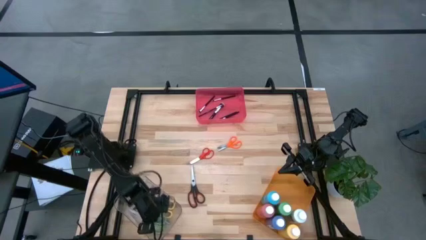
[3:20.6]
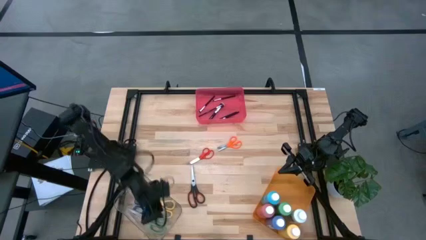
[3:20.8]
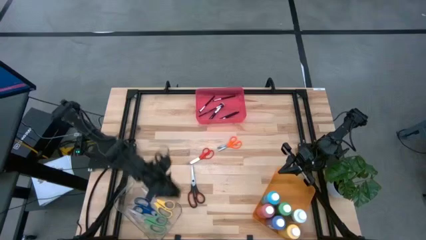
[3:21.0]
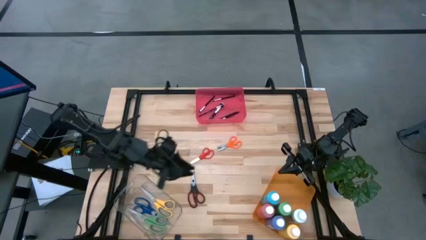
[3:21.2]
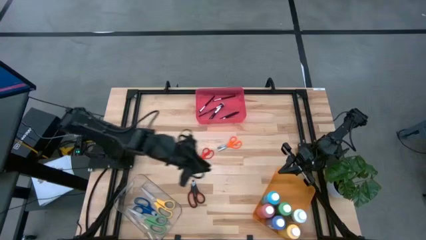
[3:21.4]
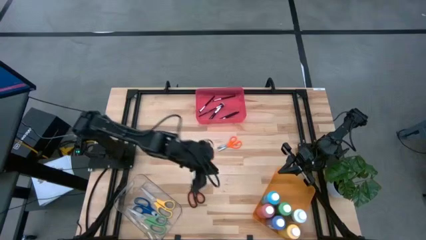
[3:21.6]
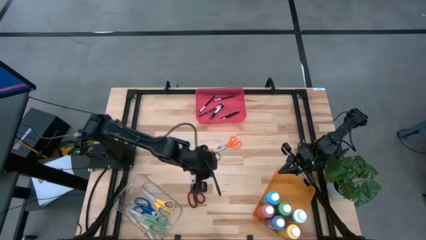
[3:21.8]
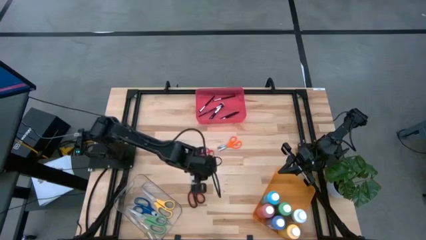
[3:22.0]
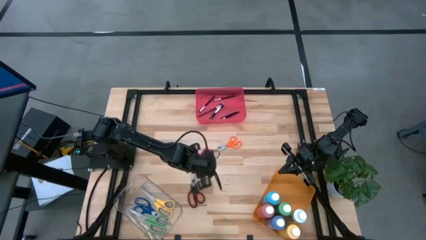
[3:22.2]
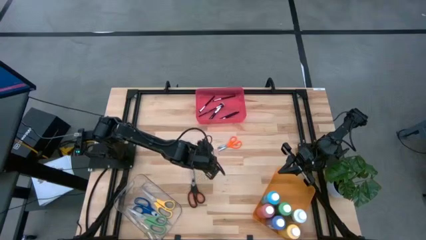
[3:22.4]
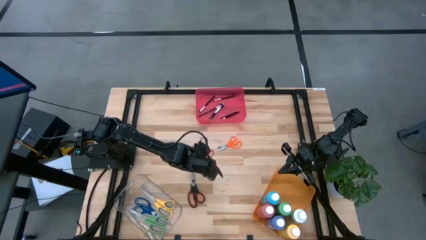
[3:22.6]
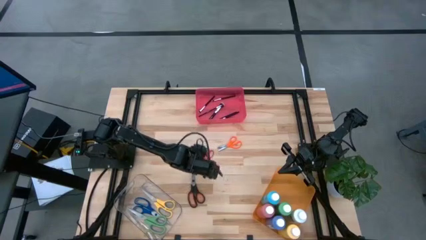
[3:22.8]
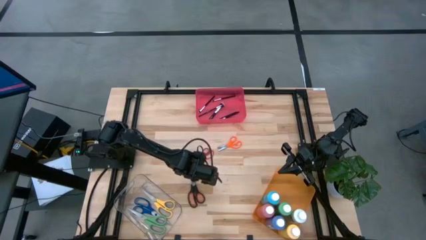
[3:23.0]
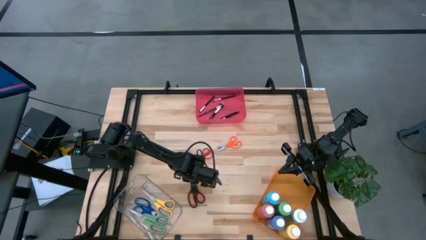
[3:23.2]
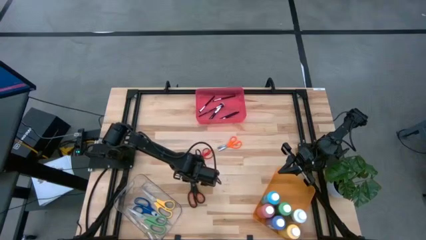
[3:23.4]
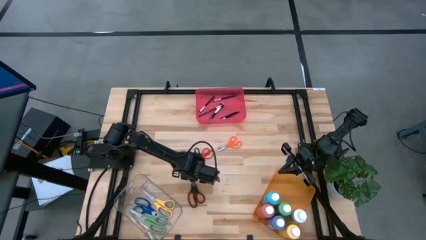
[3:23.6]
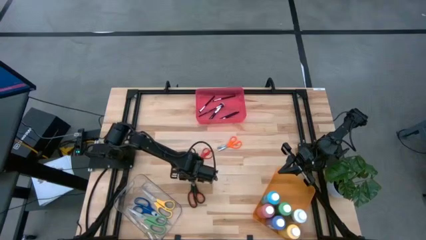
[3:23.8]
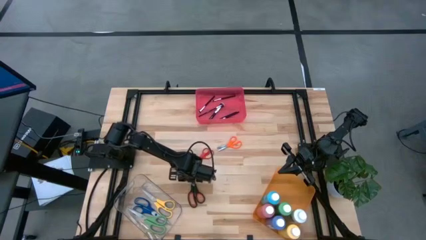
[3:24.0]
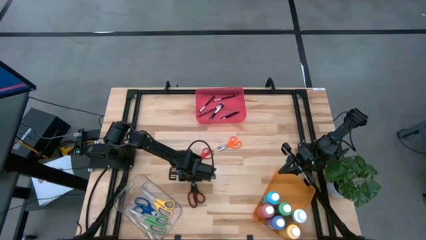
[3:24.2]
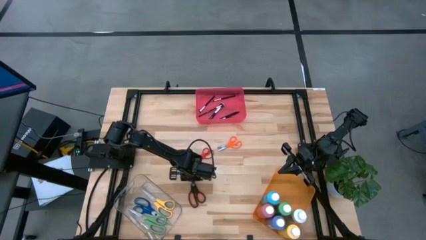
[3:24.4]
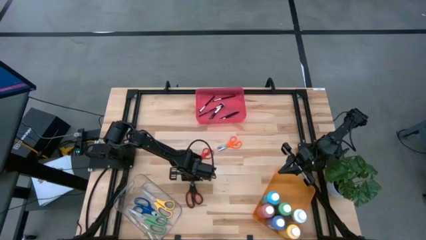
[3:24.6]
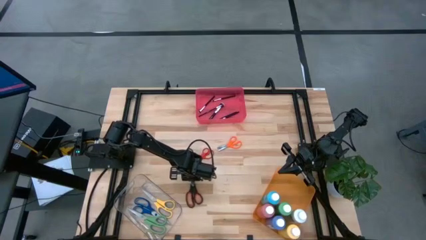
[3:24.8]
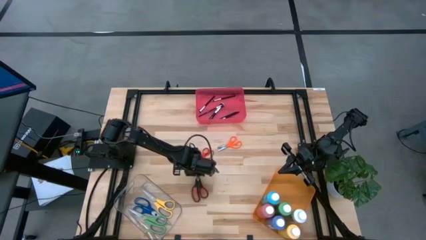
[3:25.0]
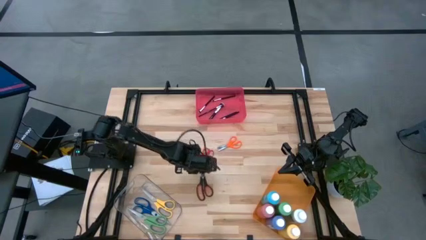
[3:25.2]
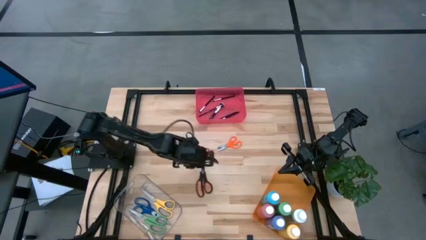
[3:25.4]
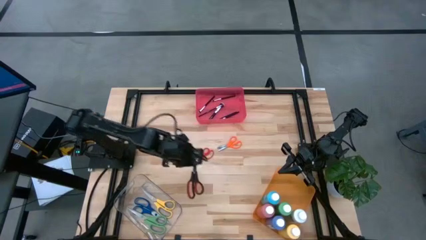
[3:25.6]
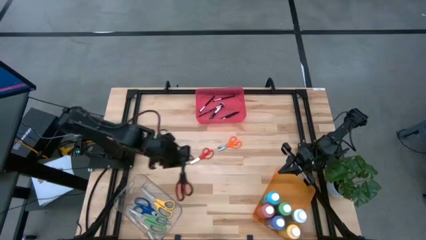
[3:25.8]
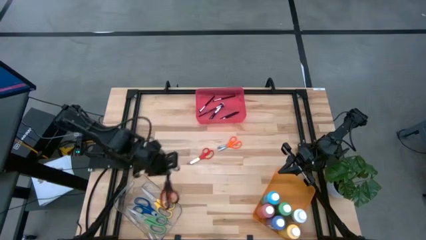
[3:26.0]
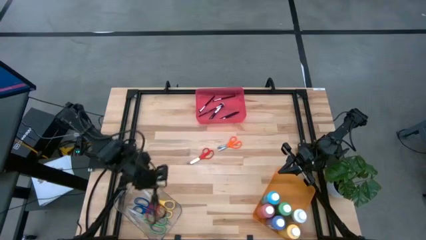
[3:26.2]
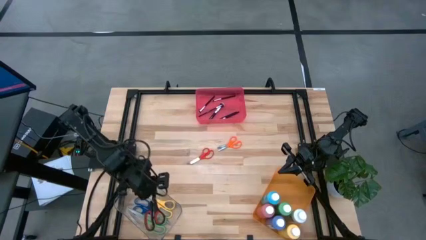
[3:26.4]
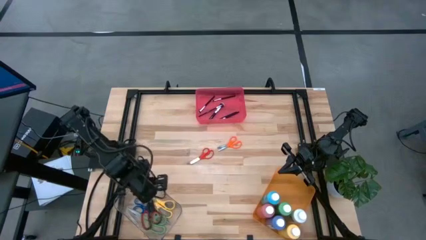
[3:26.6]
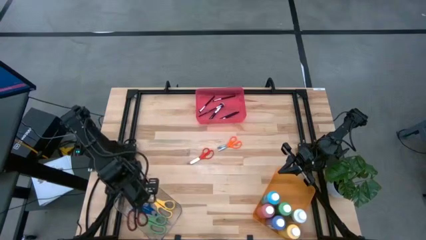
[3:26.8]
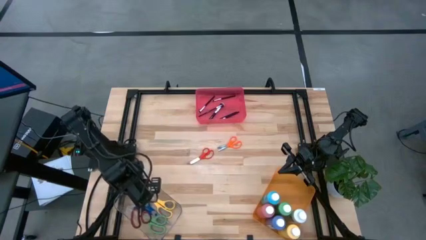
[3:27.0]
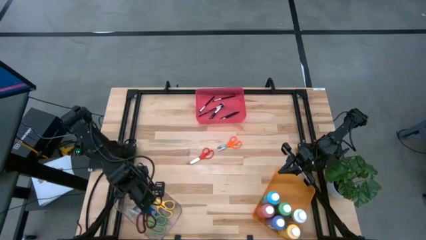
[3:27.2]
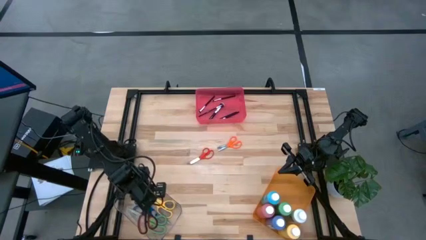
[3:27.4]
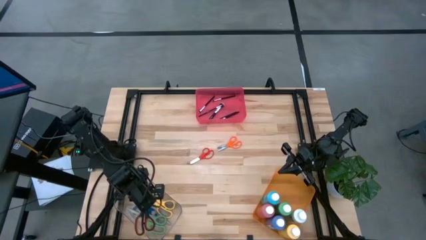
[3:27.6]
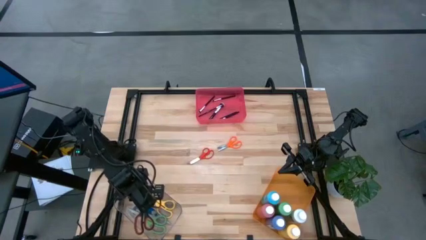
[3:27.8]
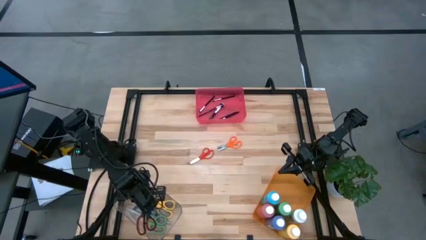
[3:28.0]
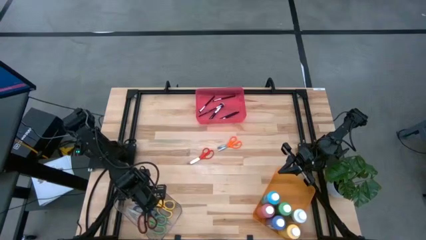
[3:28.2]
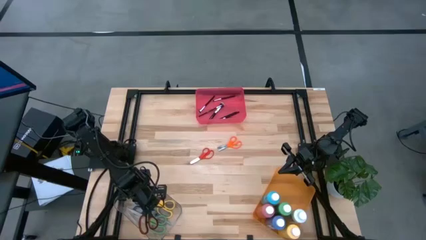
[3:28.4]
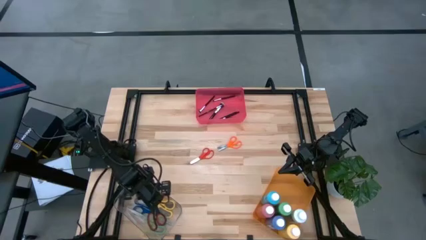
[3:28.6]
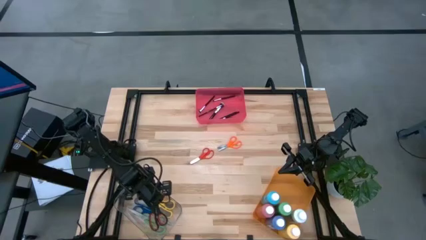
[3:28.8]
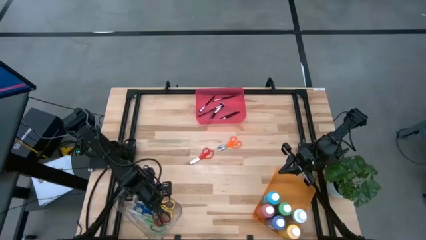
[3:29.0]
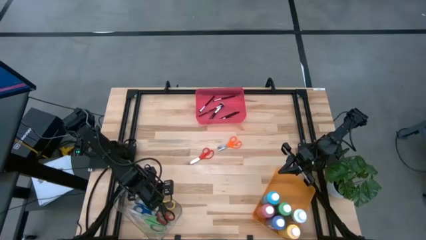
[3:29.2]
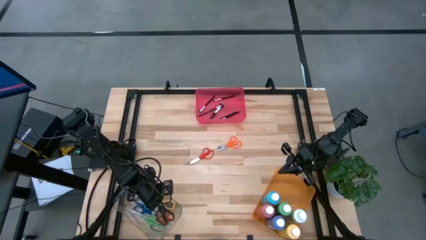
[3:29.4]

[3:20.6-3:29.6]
Task: Pick & Place Paint Supplies
Put the black scissors into the transparent bin

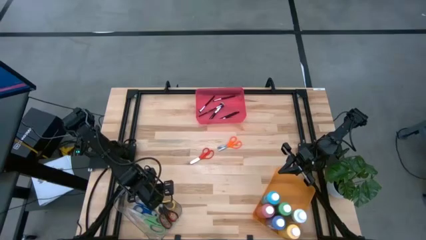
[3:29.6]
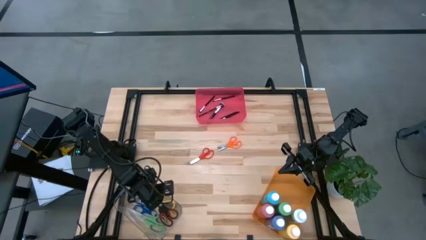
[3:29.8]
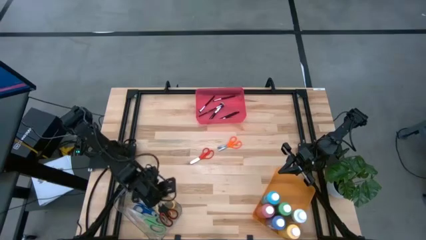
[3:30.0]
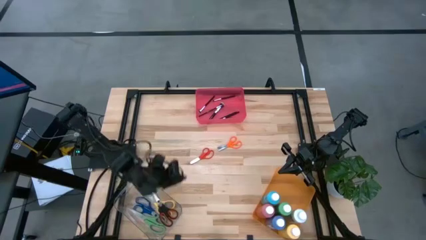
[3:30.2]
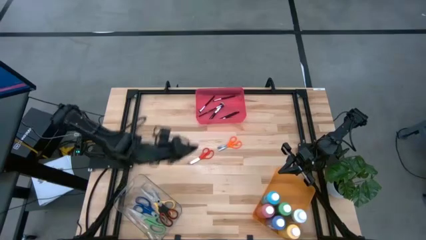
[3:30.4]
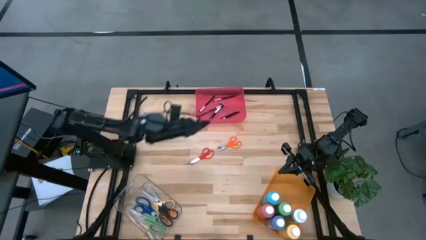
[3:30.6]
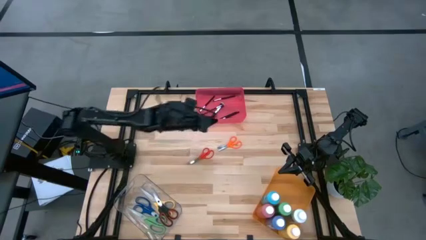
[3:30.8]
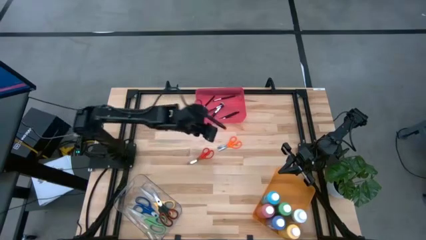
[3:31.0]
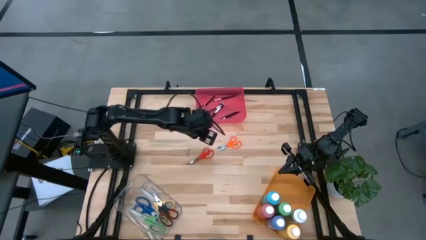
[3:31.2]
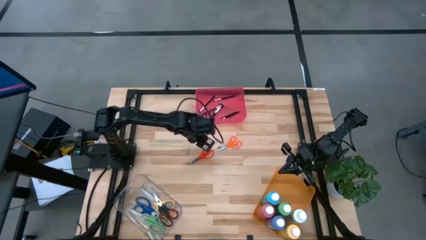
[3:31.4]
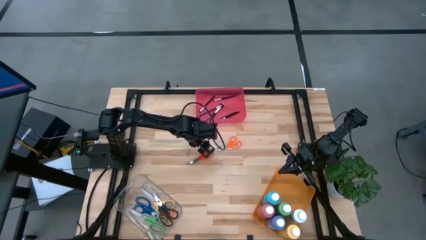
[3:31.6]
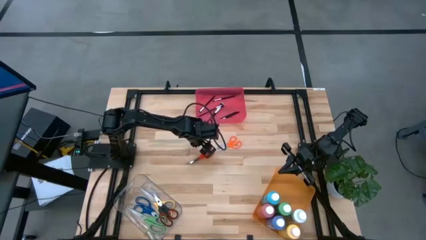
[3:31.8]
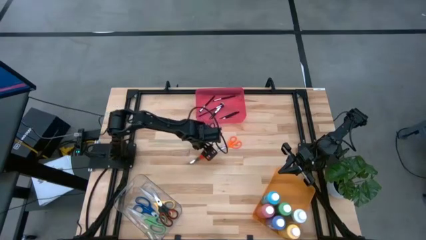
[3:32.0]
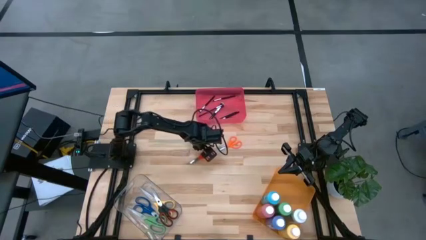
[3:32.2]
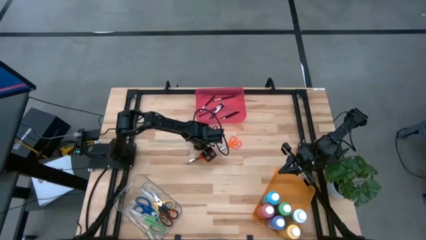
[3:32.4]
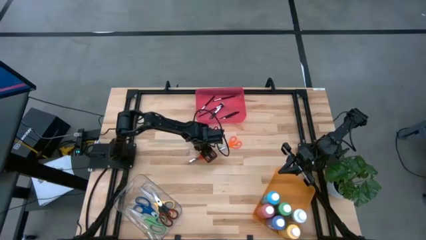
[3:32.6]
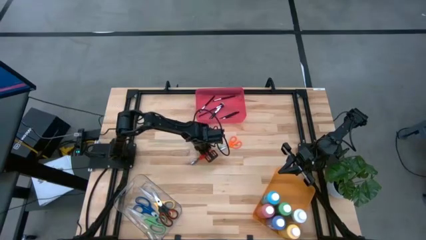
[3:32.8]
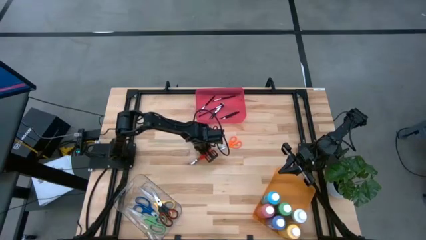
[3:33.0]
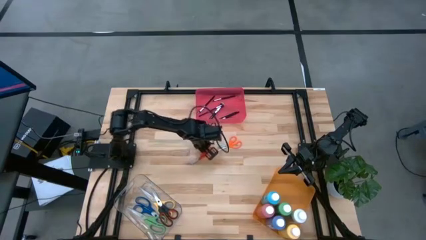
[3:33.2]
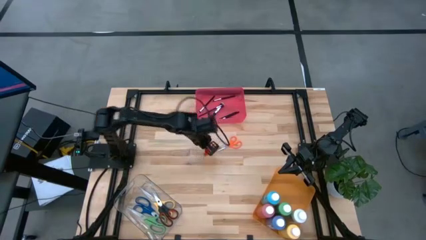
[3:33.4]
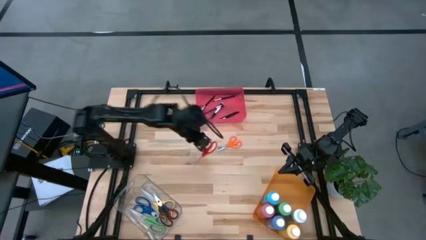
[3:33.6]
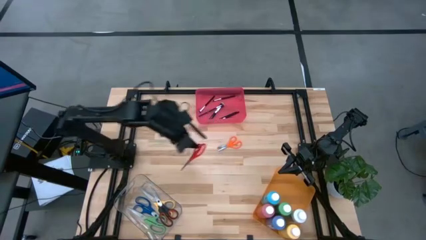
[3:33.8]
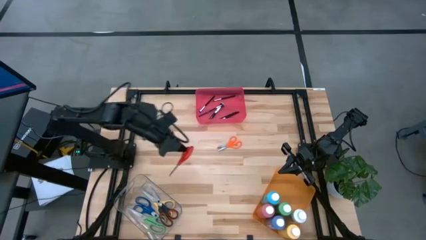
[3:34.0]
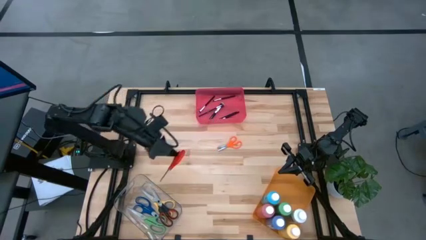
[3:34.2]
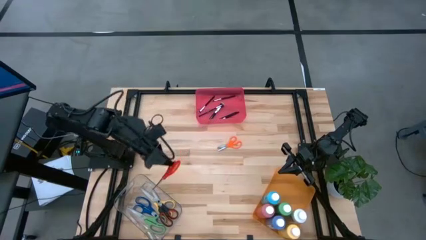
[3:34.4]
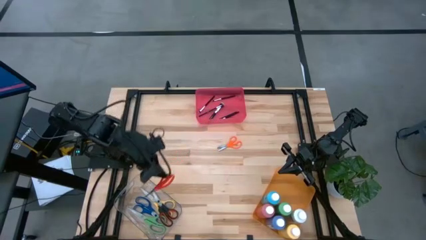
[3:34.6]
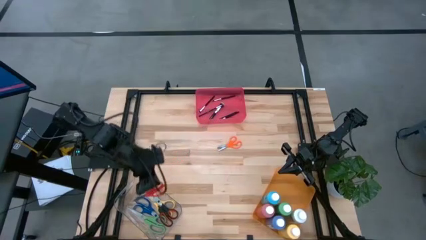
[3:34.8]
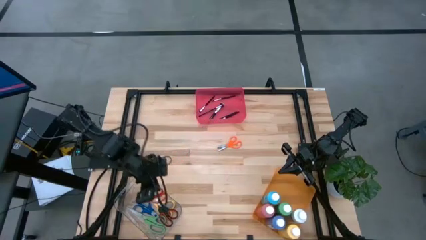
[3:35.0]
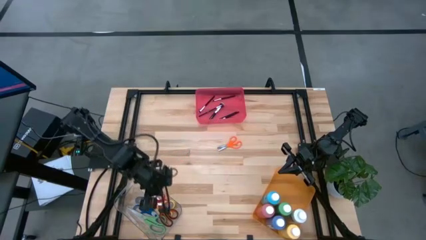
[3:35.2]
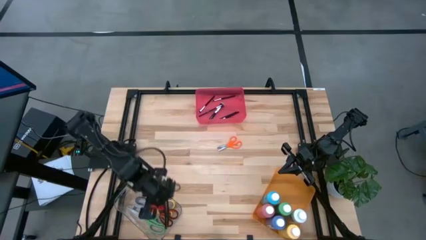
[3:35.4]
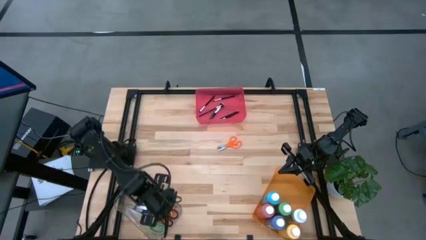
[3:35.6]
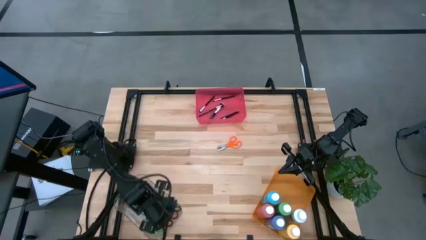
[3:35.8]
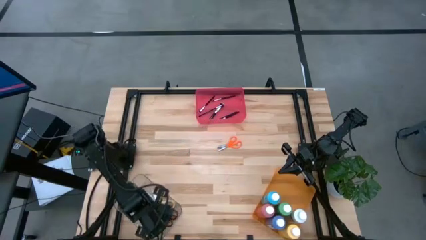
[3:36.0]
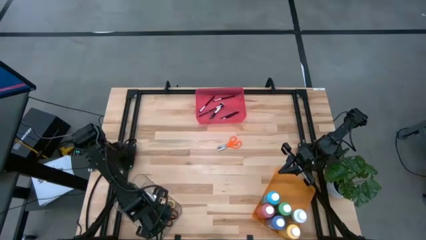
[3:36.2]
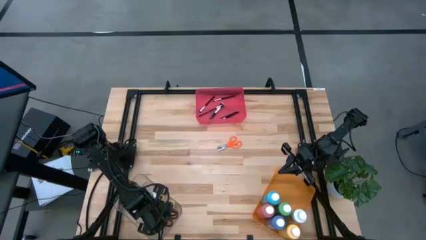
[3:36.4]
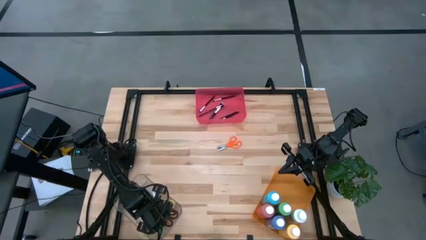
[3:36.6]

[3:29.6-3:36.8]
Put the red scissors into the transparent bin
